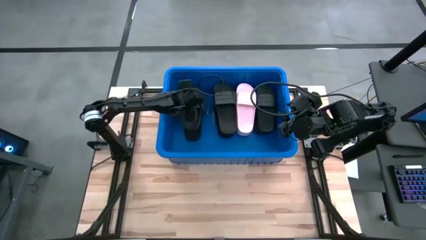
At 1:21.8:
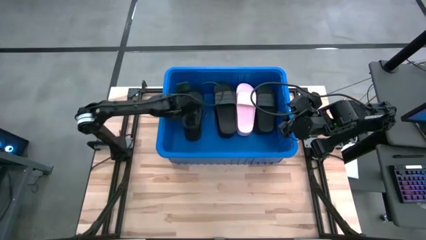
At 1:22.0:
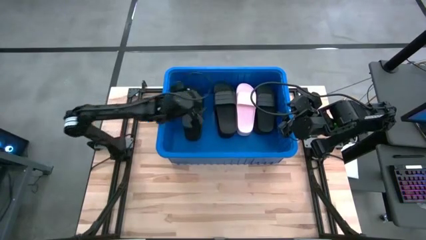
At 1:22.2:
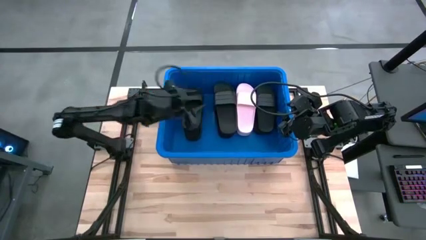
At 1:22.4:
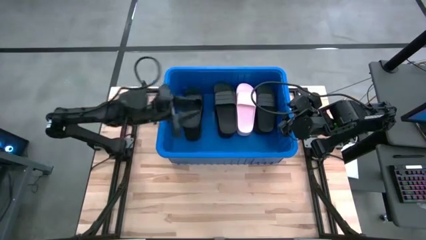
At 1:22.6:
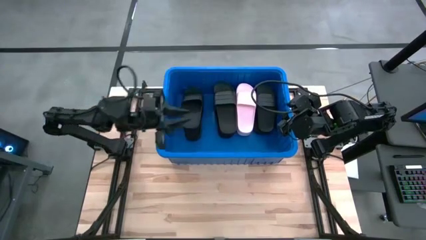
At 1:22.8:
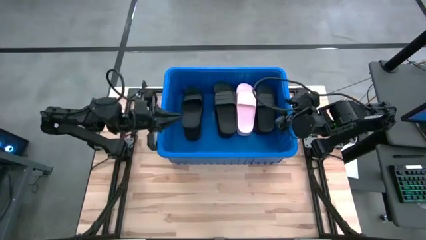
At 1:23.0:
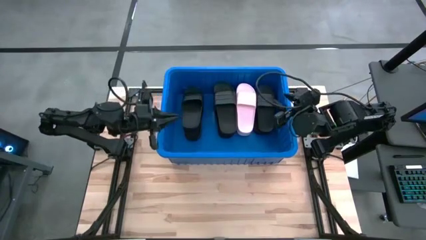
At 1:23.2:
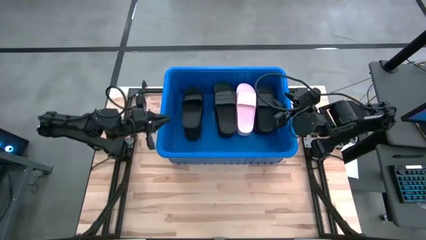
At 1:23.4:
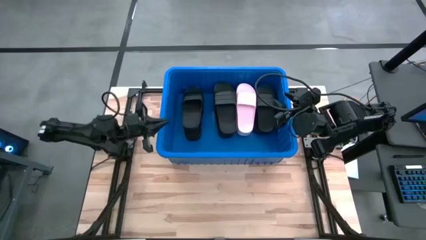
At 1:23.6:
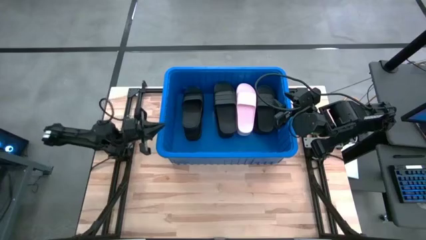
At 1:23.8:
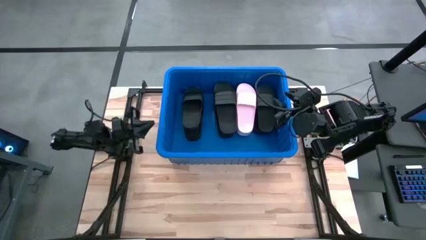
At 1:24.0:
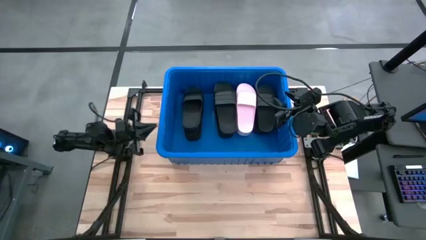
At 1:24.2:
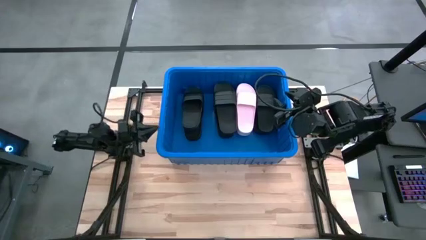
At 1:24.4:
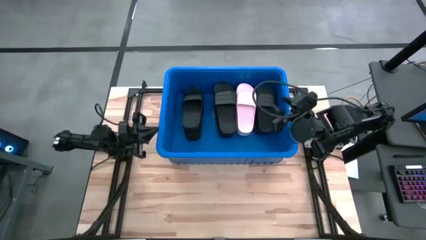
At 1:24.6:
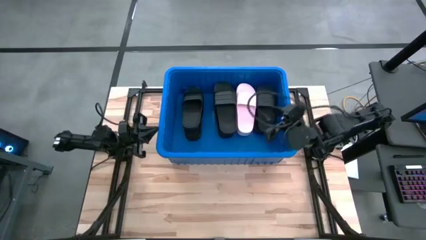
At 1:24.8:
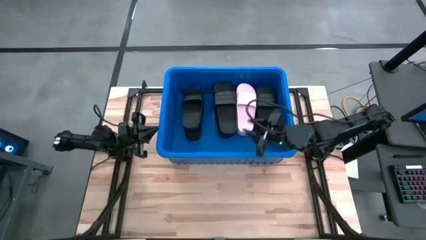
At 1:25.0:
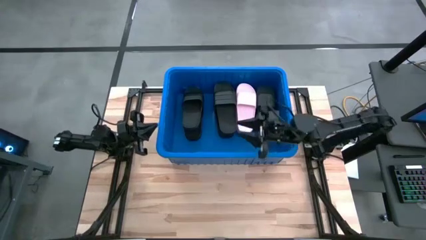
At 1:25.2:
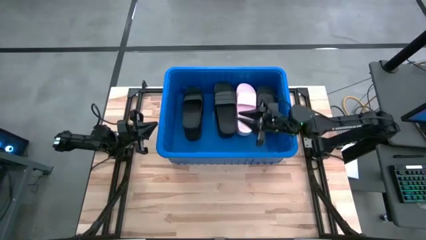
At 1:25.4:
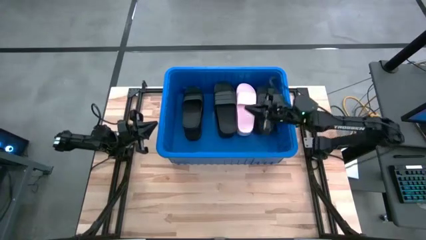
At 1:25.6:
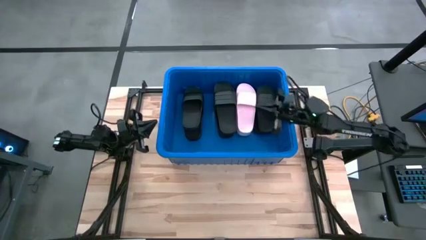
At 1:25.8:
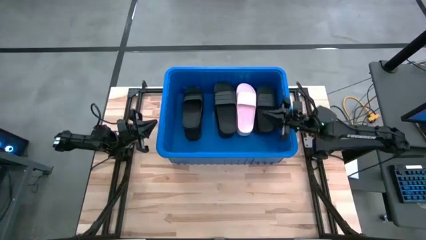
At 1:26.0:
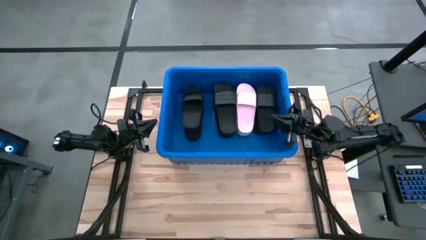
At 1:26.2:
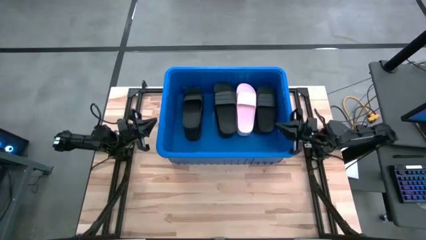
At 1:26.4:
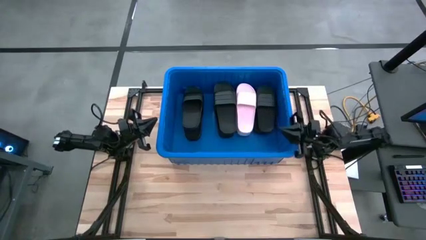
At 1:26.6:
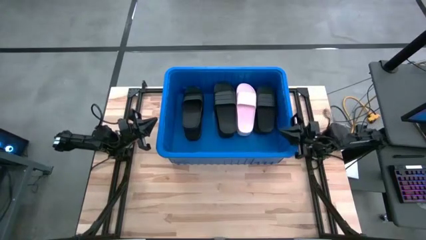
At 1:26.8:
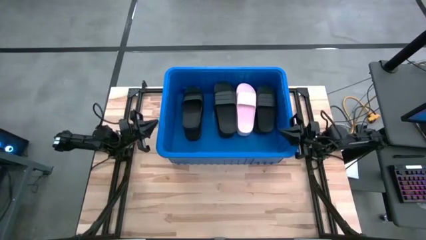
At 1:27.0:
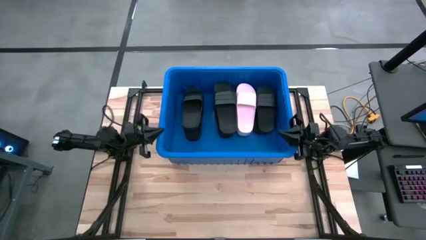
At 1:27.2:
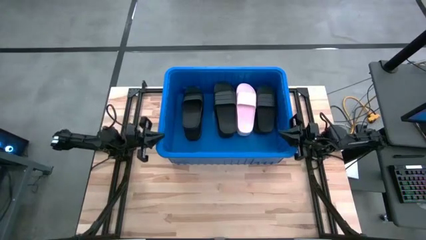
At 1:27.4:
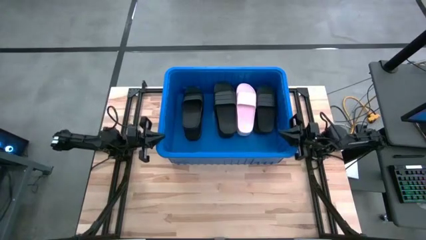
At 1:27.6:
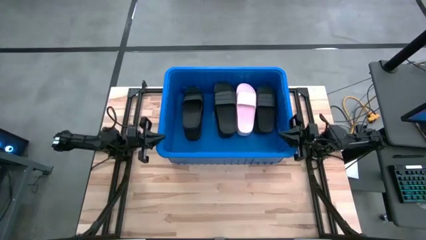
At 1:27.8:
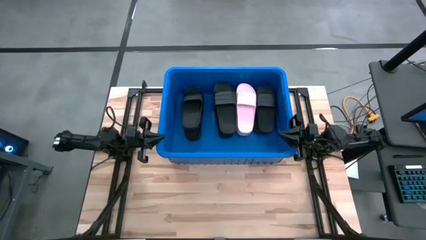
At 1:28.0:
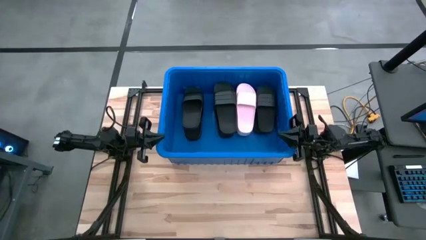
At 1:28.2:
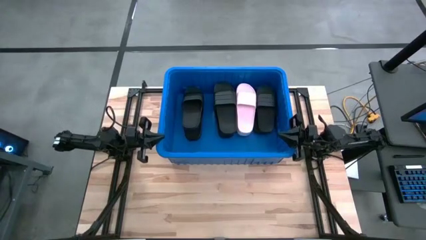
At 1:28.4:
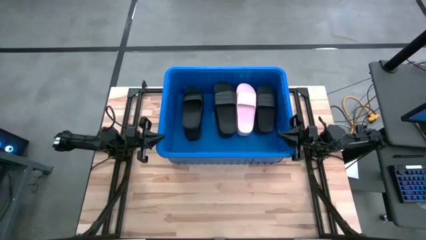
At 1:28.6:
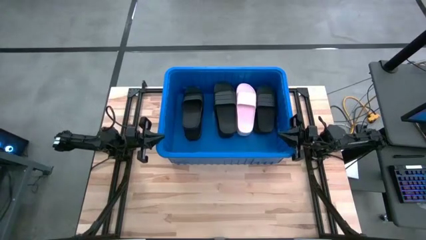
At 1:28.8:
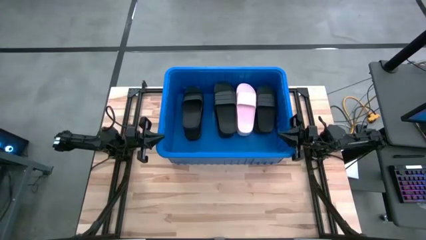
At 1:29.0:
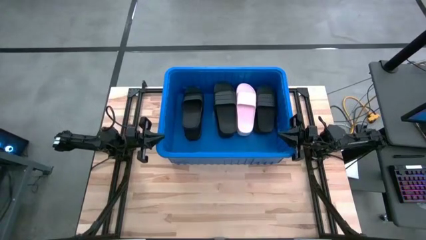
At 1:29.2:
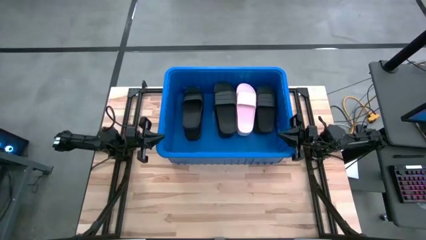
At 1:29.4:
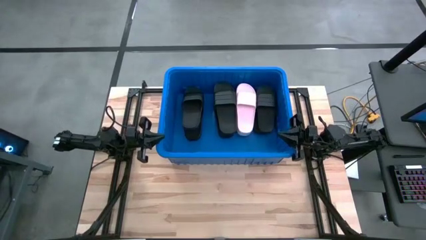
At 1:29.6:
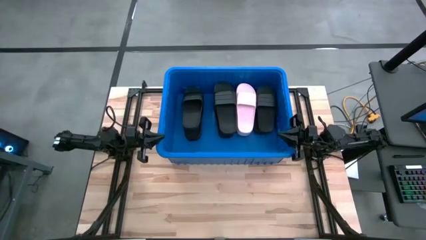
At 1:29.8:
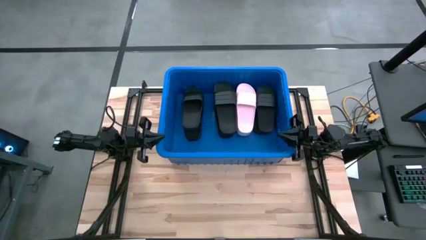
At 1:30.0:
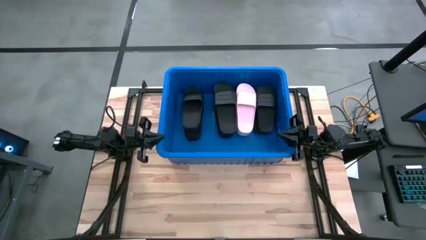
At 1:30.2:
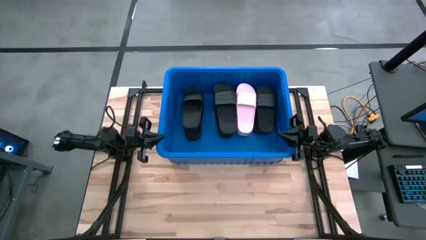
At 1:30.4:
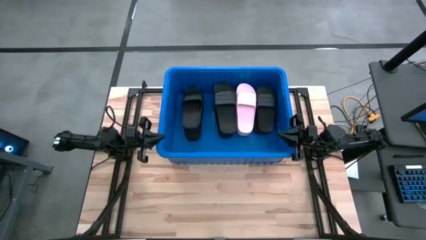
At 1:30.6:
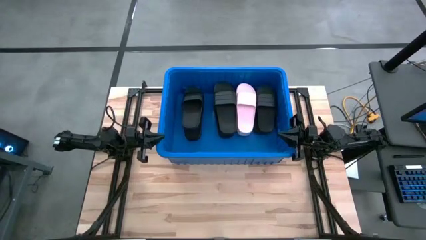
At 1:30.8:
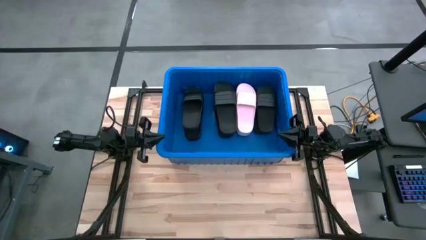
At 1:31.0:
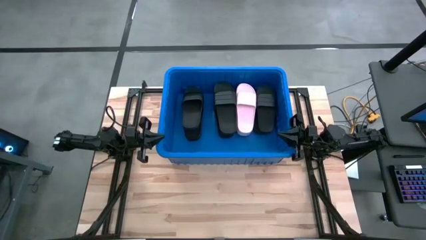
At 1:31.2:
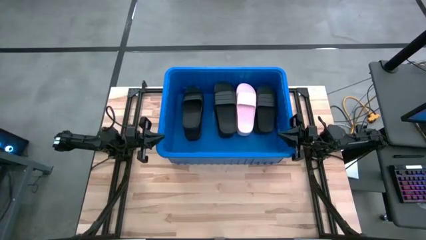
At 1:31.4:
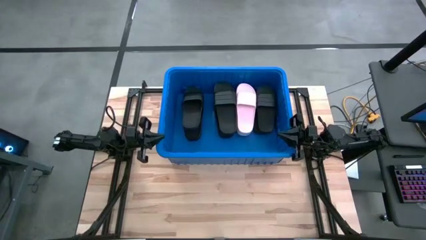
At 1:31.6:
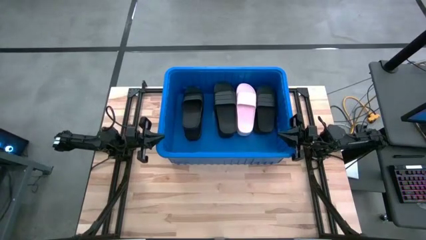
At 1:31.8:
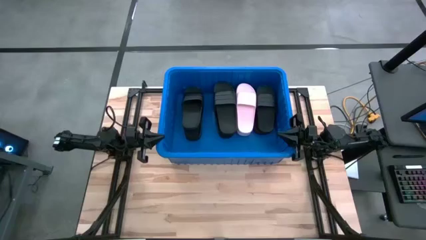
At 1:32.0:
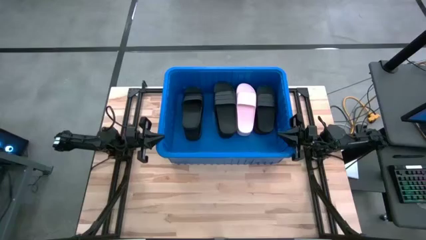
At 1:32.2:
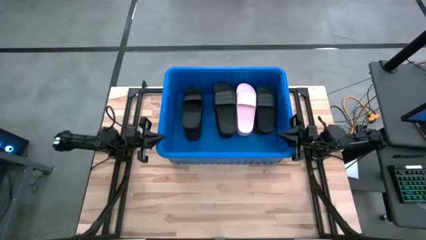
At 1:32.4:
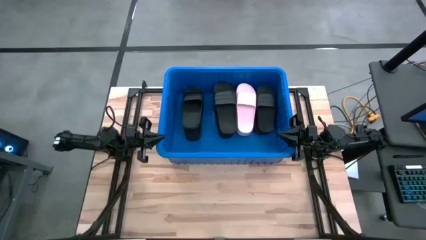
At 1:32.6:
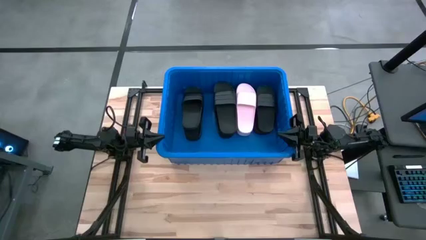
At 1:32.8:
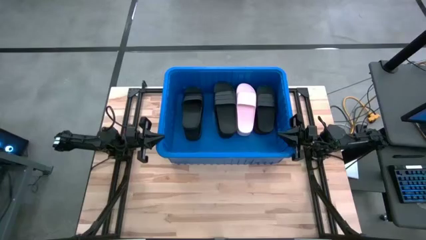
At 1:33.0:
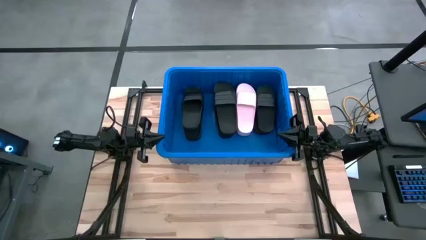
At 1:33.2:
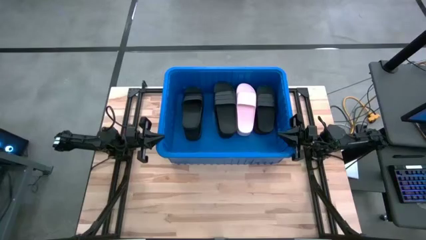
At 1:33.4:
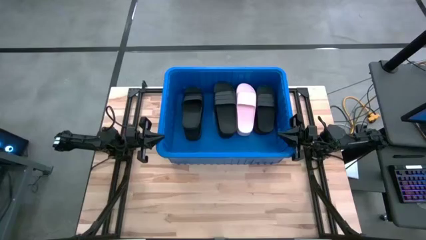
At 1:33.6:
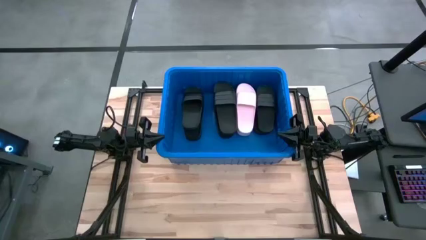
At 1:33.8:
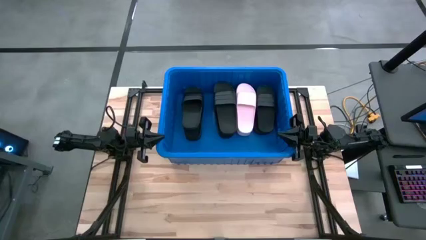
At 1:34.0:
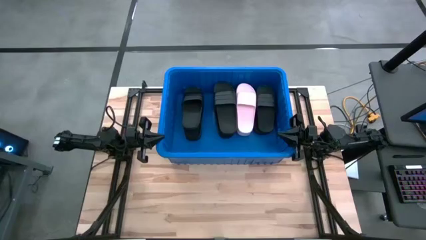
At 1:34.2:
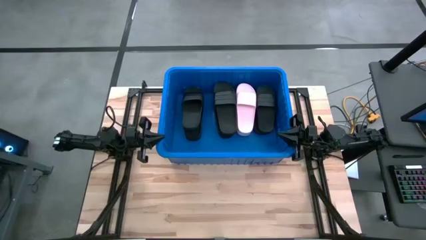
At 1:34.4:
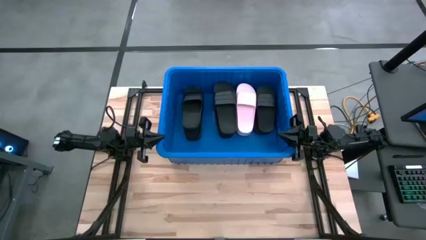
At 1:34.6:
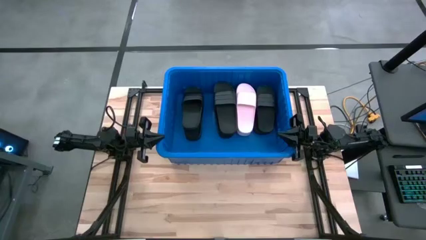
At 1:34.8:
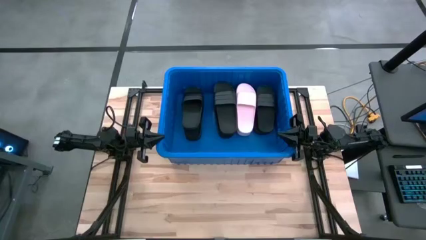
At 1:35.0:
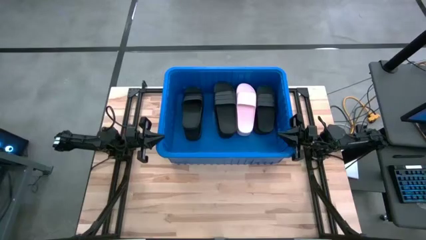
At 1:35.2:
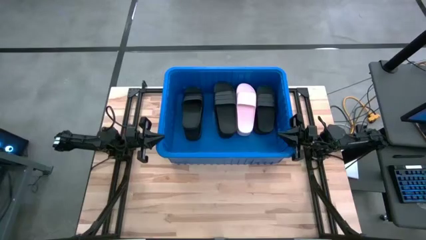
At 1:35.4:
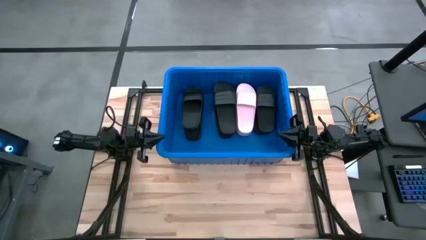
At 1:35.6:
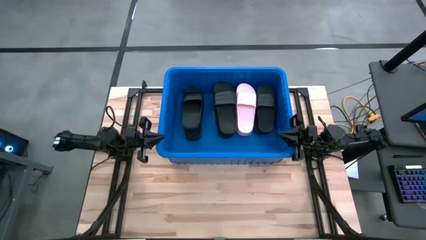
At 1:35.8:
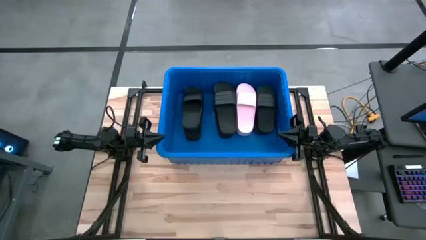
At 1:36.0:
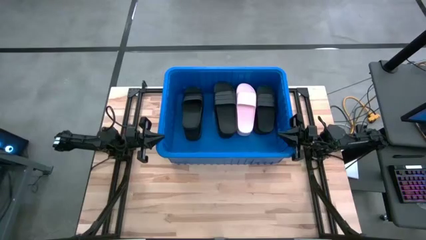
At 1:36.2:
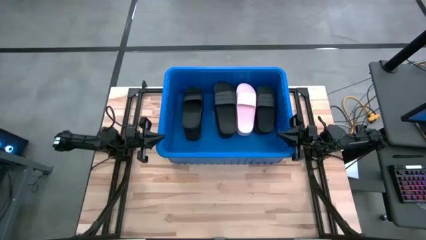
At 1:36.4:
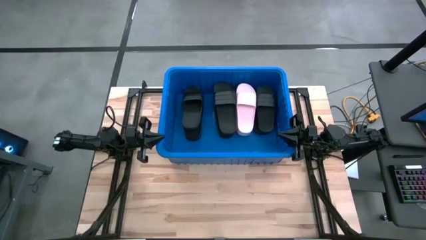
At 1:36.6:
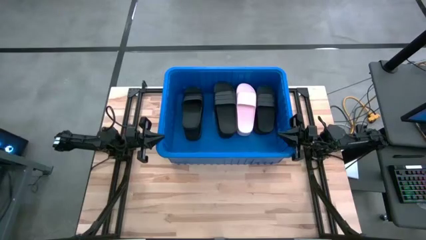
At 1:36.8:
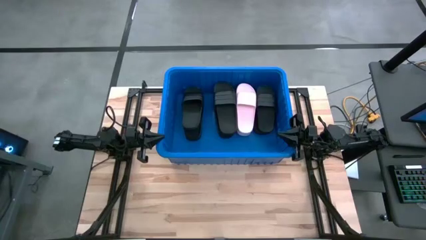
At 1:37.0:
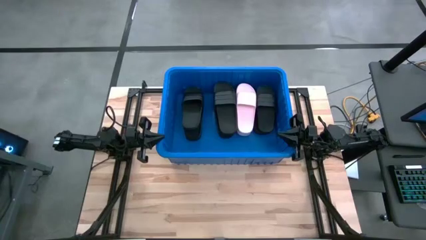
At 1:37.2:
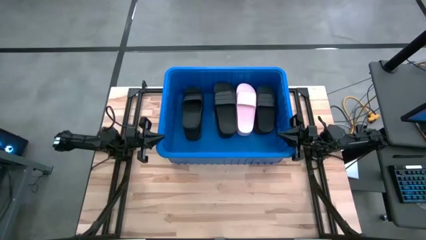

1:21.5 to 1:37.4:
Task: Pick and place slides into bin
Return to Home Position
